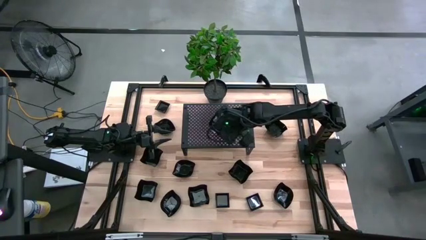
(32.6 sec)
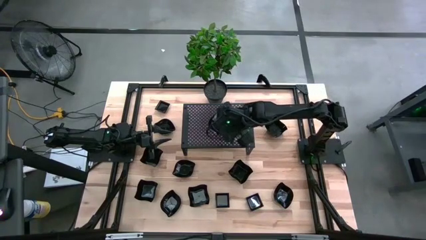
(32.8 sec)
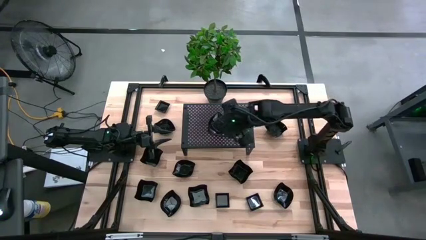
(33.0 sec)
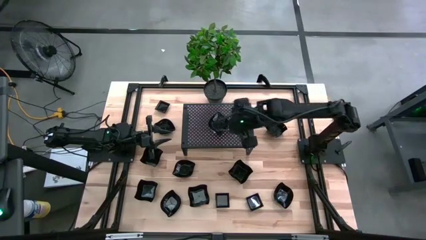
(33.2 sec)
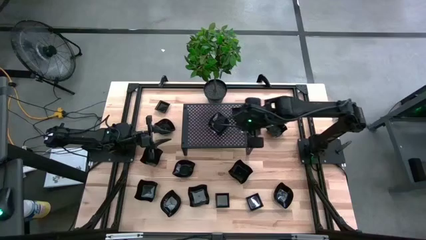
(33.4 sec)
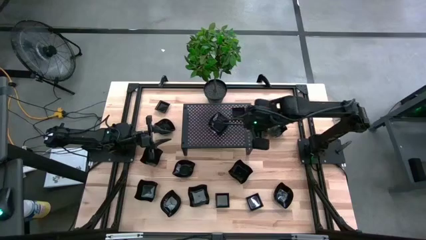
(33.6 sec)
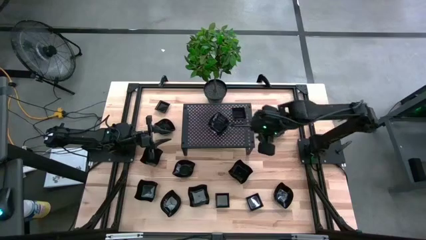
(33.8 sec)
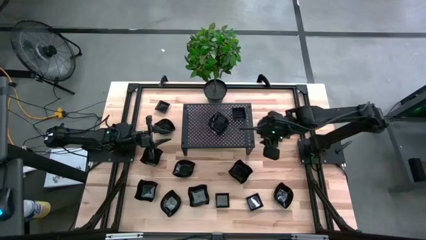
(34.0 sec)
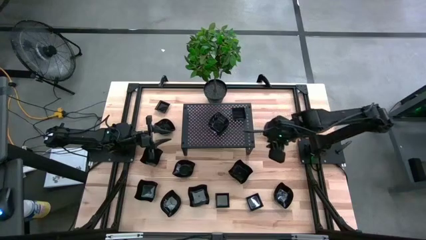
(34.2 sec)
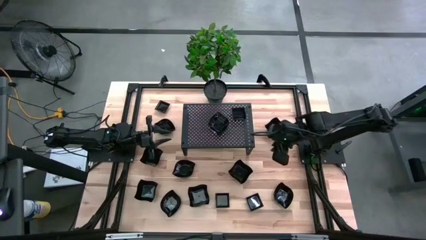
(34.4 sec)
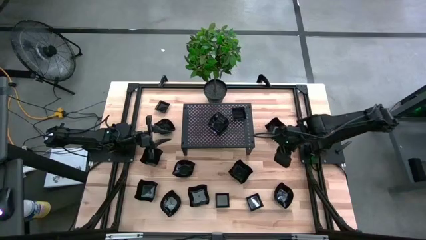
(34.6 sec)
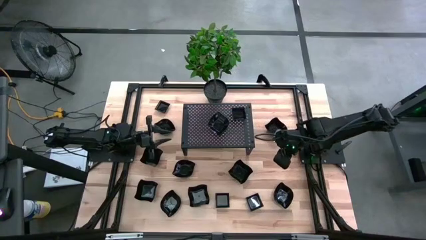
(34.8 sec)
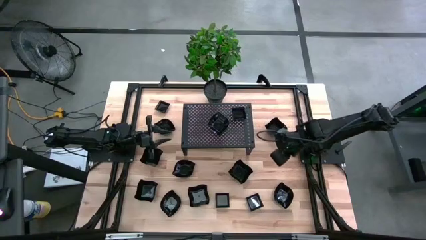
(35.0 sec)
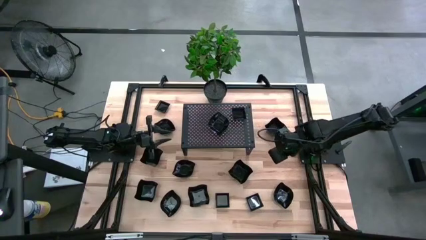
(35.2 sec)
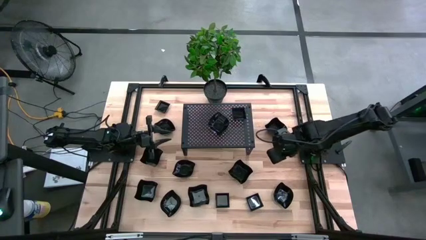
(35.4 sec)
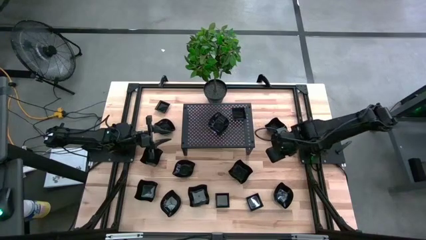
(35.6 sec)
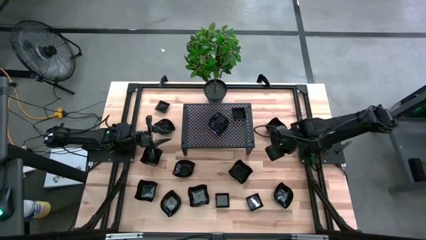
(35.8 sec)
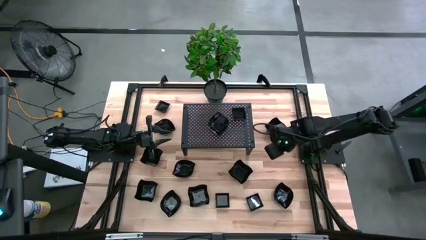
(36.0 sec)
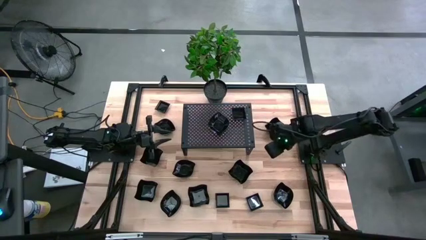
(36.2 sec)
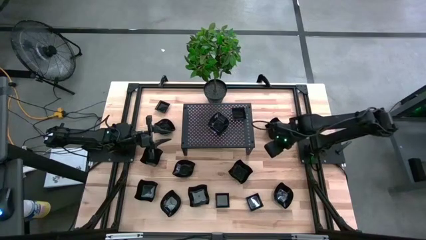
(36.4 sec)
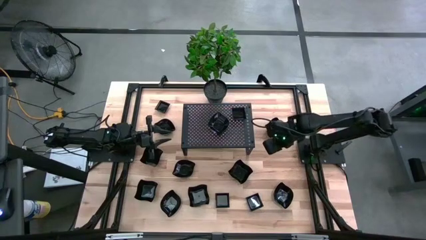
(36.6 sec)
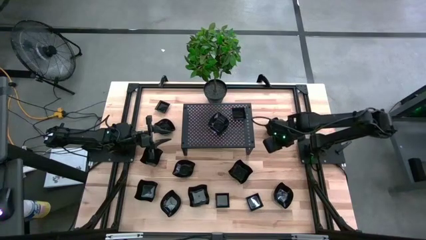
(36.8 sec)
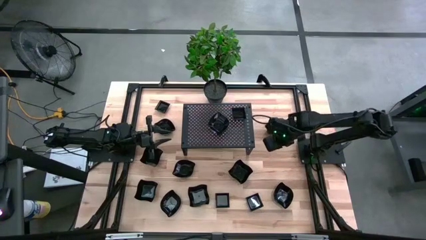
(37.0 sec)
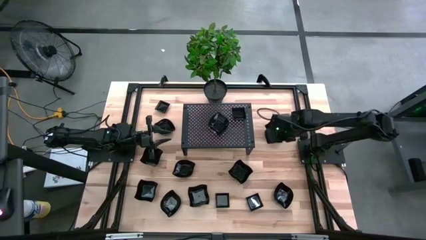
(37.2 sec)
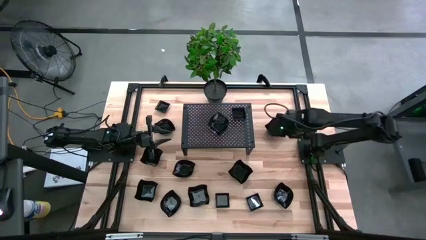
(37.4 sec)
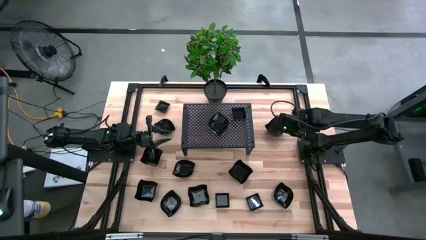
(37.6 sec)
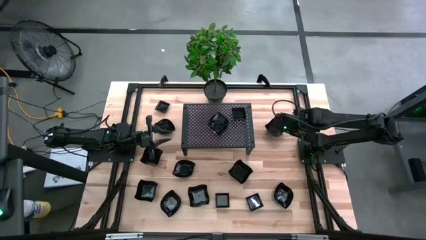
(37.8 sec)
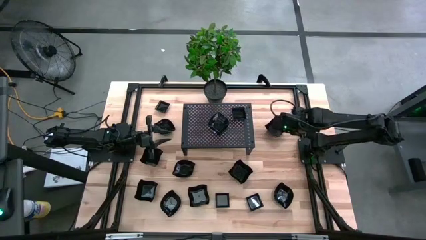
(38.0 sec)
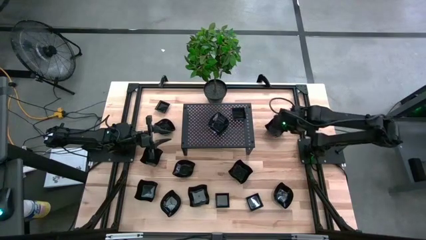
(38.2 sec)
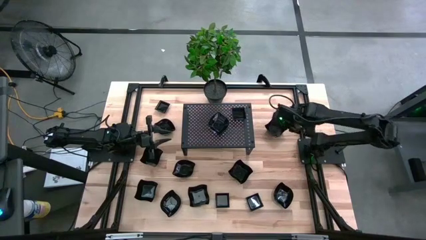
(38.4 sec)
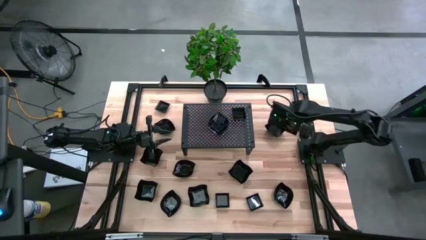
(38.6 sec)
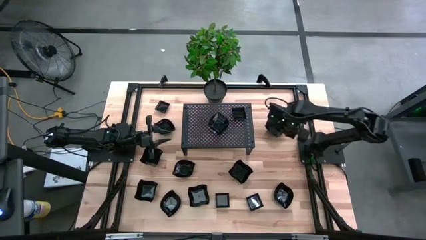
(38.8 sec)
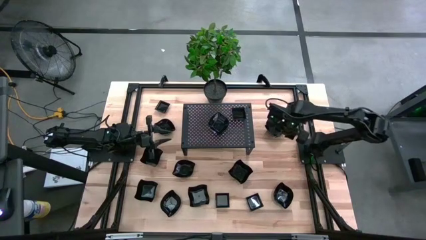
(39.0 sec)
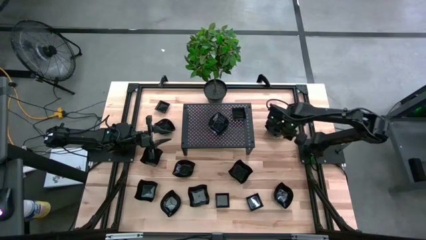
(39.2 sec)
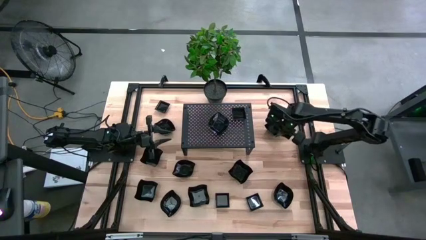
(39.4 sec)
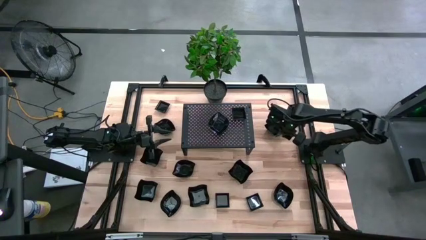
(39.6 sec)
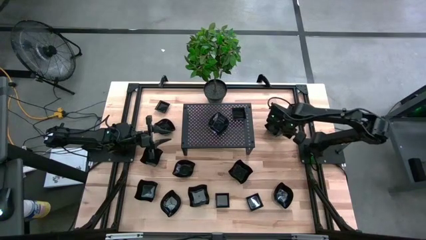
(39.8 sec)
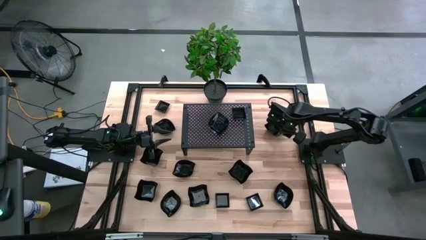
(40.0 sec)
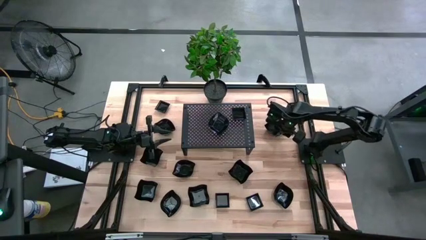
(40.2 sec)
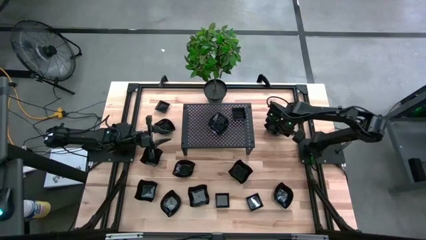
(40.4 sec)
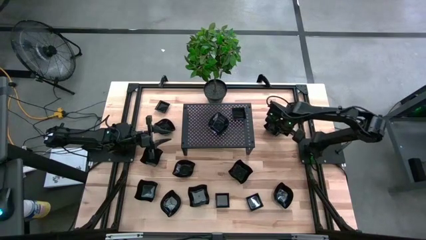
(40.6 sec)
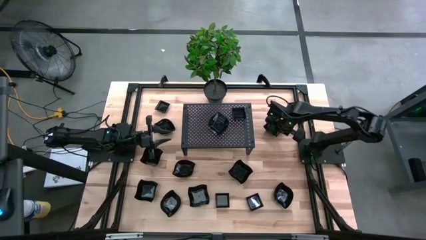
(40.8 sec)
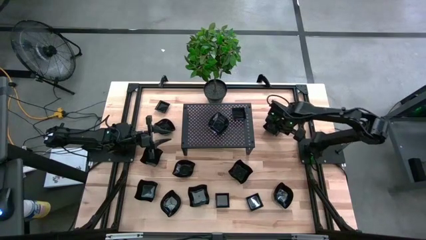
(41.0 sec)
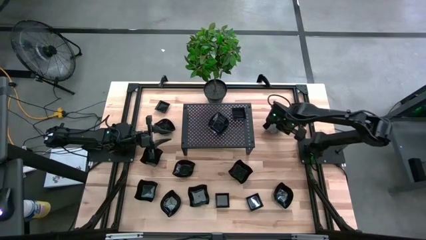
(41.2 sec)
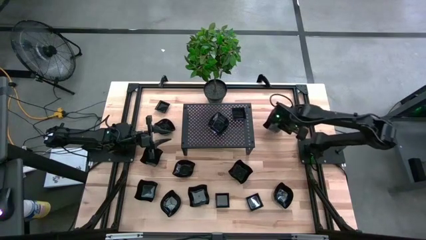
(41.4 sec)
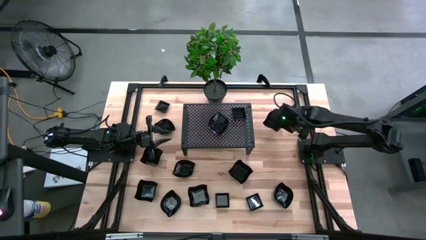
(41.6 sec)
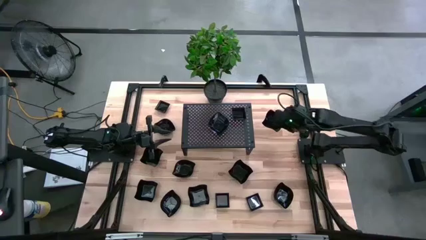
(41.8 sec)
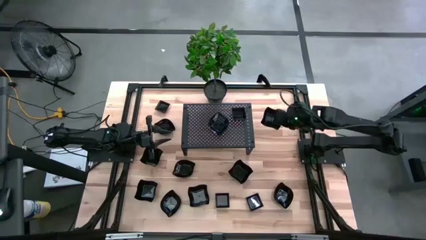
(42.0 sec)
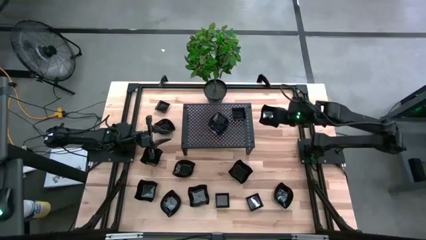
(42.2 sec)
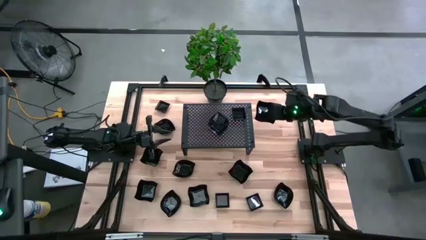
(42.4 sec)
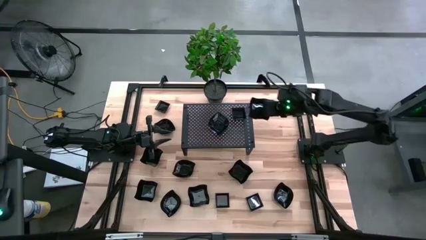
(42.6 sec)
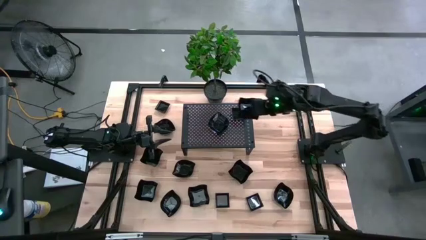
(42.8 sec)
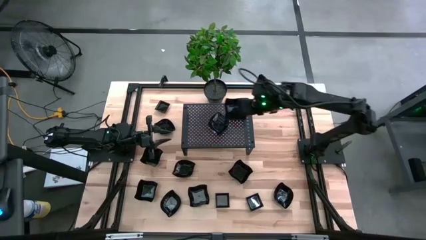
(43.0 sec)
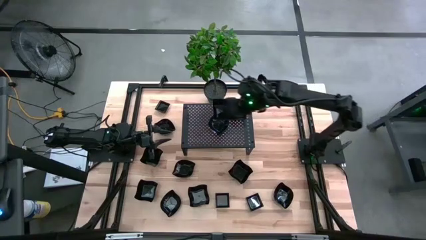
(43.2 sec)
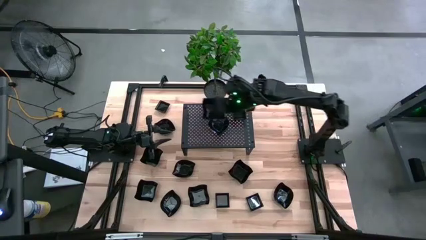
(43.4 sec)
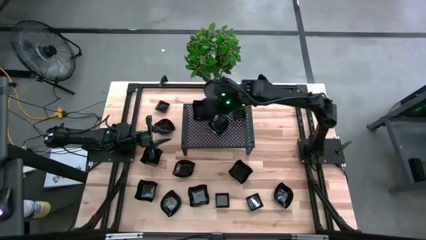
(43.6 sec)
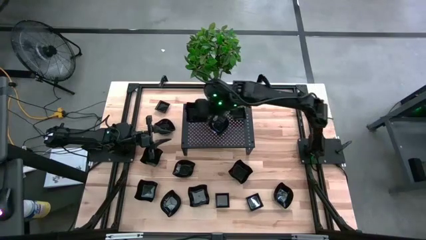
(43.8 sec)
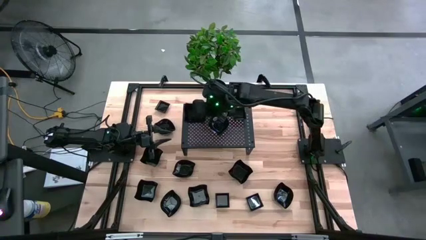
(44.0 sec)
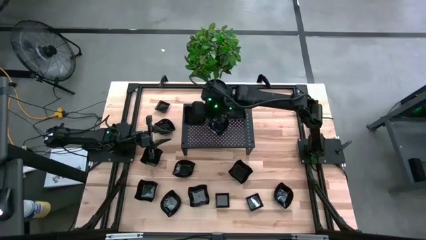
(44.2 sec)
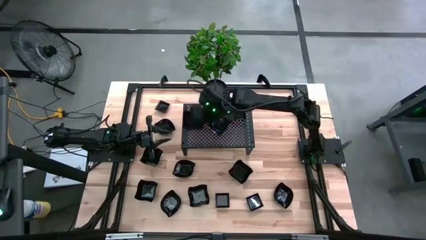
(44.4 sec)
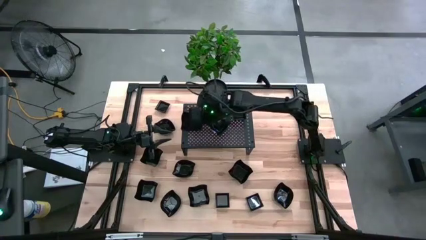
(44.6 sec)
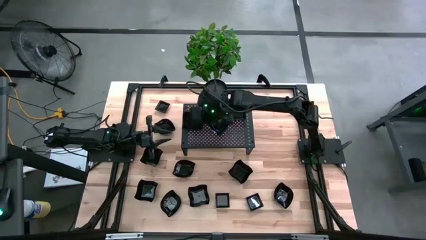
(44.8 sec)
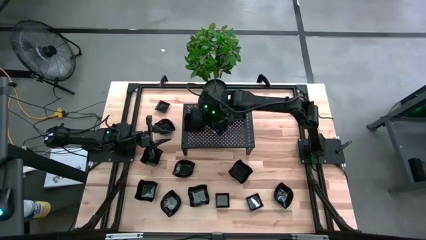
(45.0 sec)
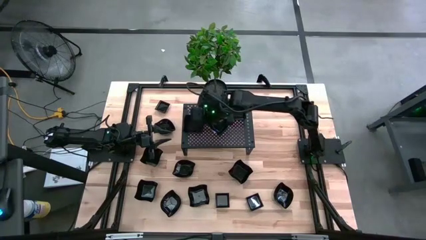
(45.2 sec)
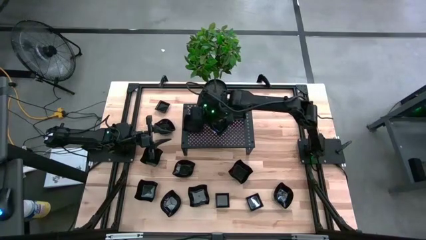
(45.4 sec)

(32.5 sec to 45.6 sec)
Task: Pick & Place Mini shaped plates
Put the black distorted square plate on the shelf
